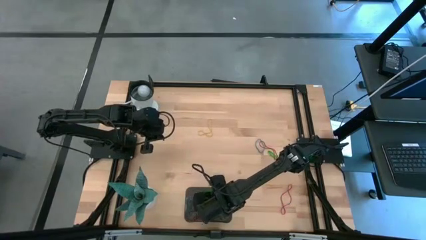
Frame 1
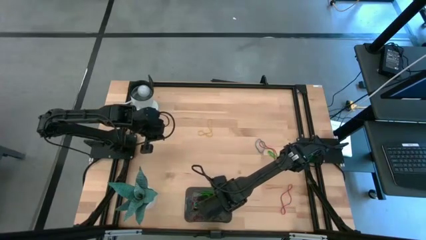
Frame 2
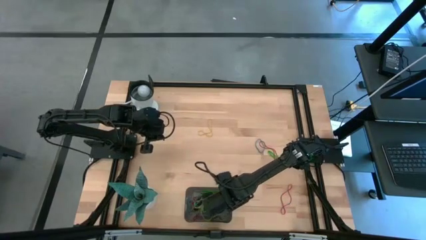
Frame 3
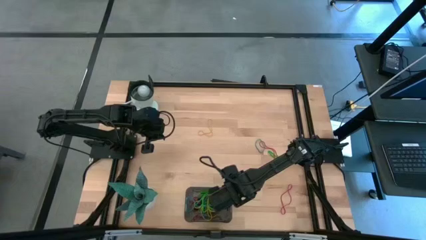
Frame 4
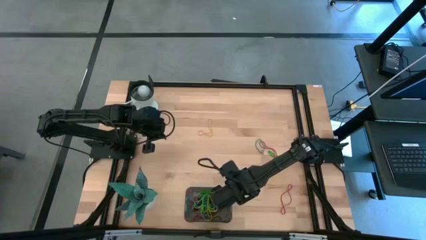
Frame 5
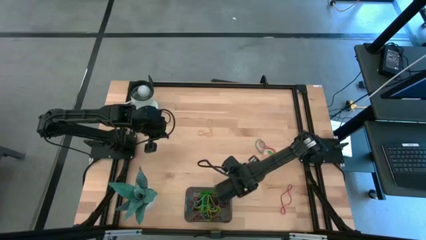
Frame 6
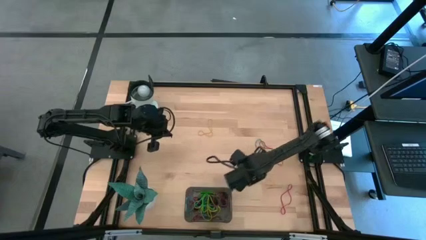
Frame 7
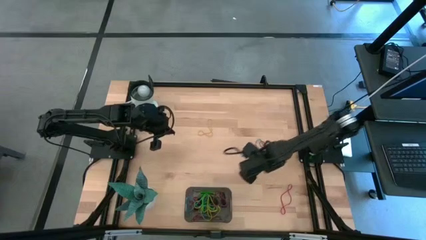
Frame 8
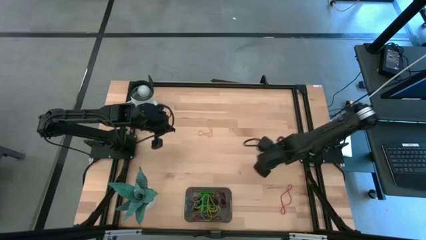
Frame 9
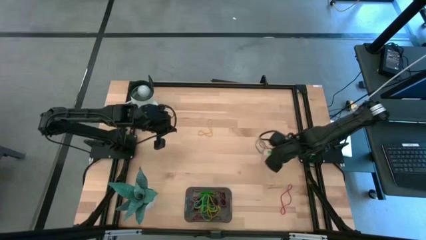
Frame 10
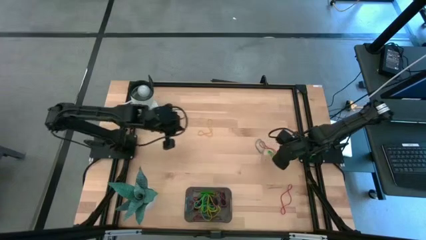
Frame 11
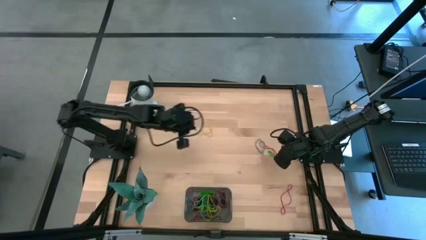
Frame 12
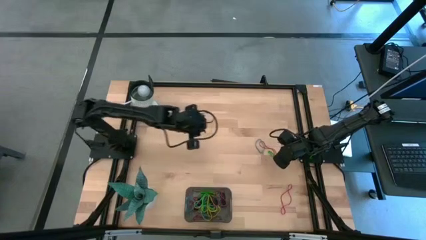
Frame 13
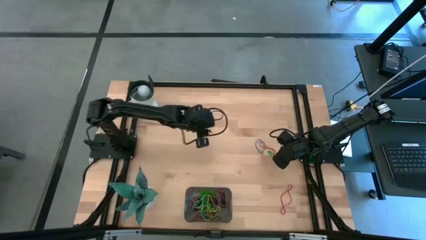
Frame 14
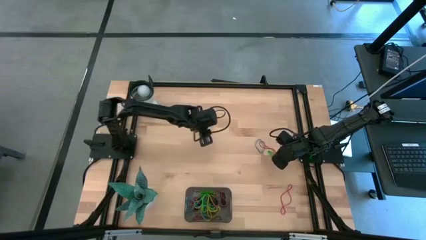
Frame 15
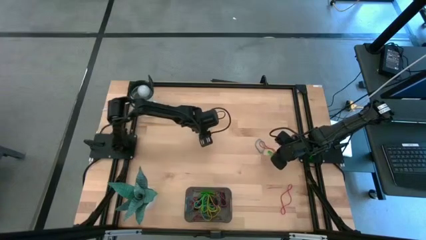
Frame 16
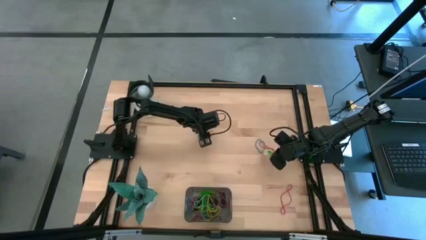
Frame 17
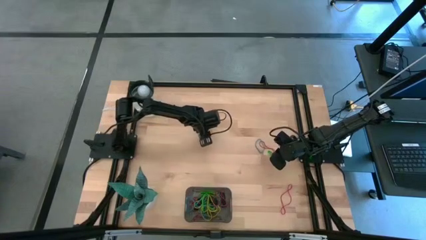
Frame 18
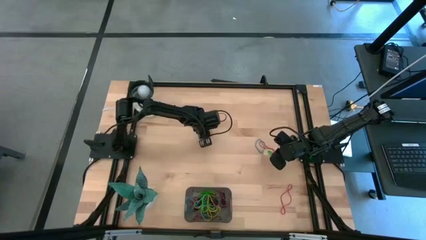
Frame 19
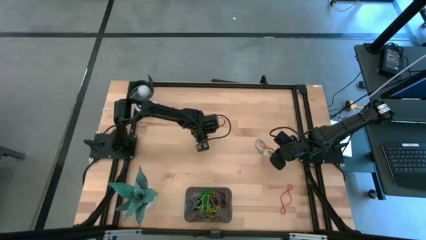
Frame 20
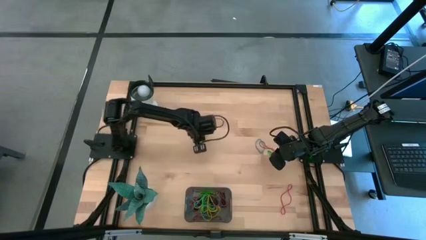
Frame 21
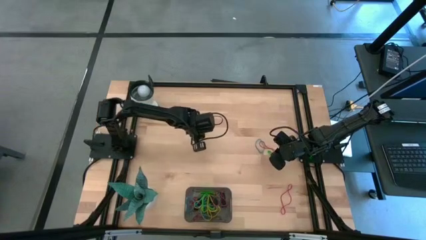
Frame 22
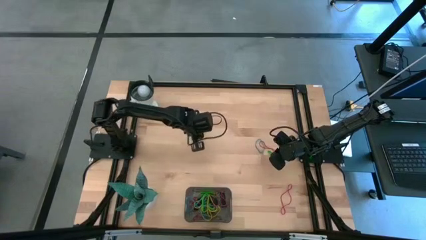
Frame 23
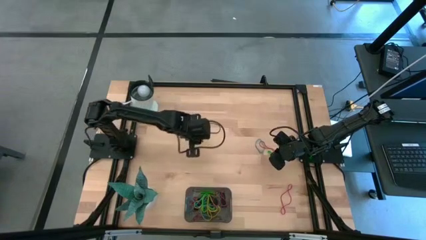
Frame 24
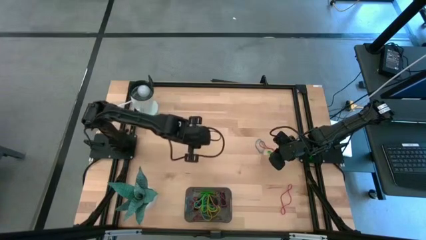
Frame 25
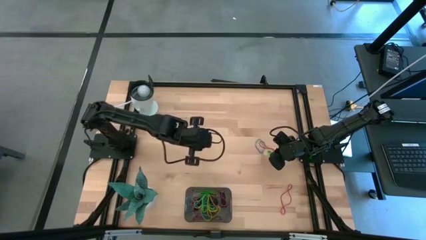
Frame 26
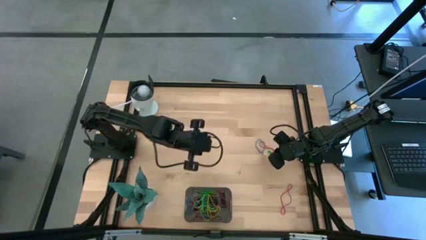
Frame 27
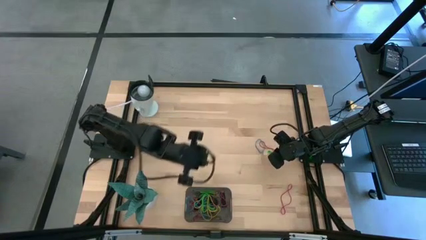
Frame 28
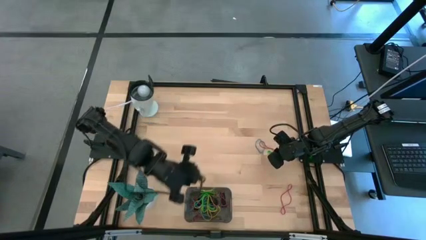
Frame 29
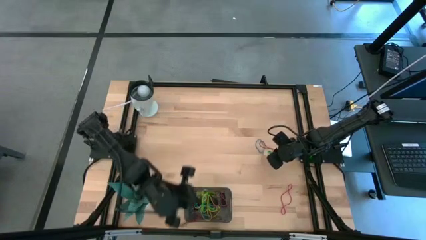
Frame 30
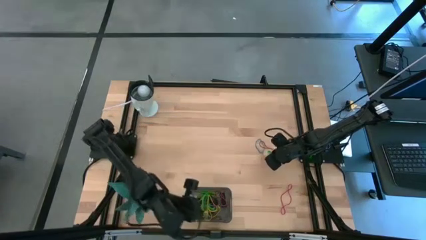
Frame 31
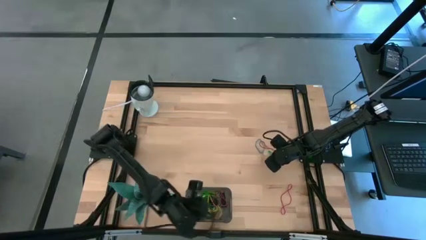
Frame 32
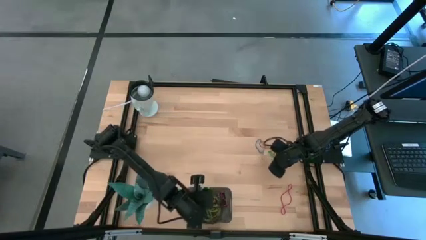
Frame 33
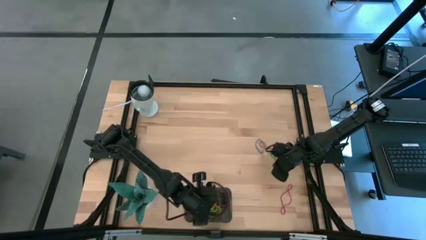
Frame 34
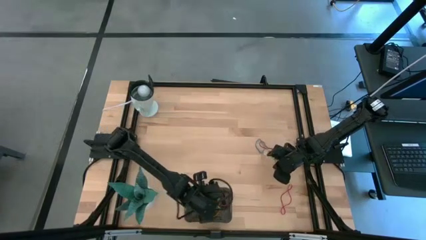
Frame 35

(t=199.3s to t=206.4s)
Task: Pick and place rubber bands into bin
Put the yellow rubber band into the black bin

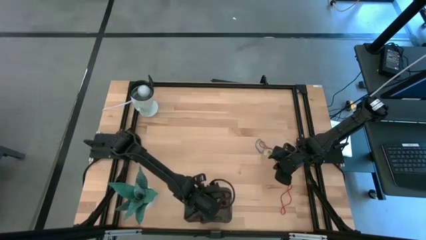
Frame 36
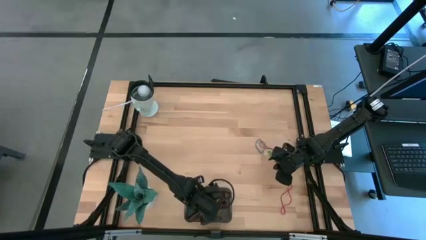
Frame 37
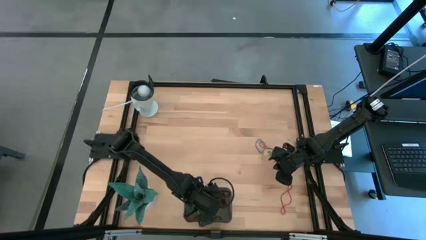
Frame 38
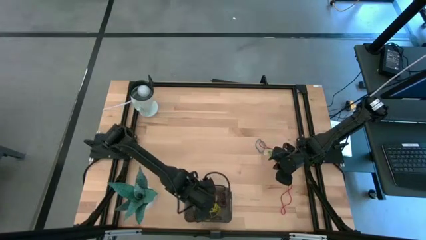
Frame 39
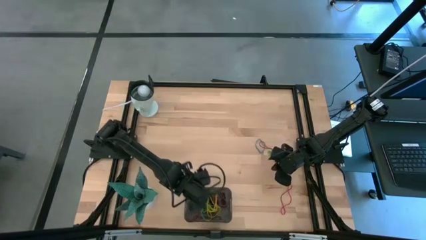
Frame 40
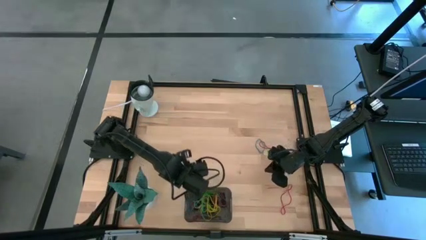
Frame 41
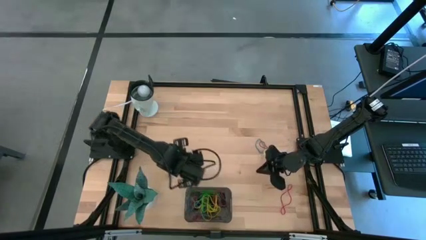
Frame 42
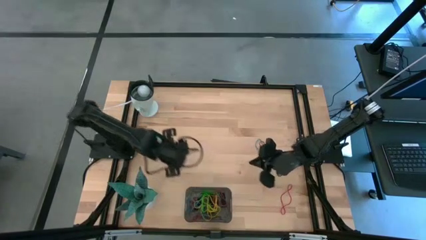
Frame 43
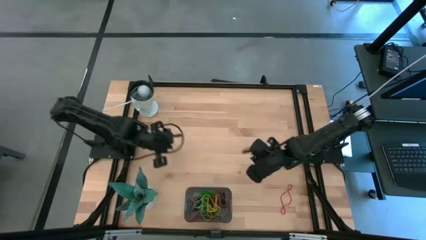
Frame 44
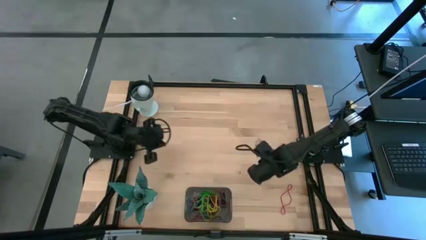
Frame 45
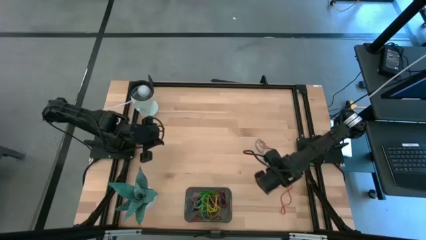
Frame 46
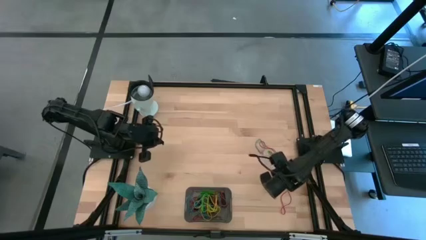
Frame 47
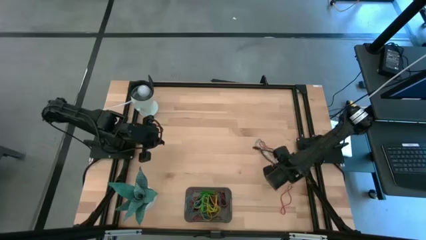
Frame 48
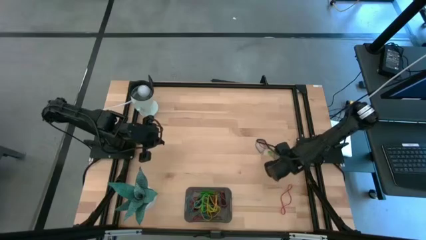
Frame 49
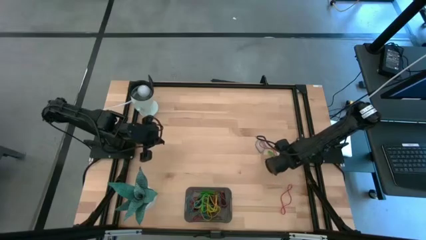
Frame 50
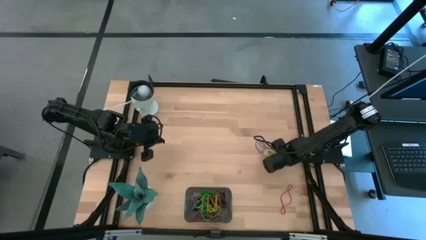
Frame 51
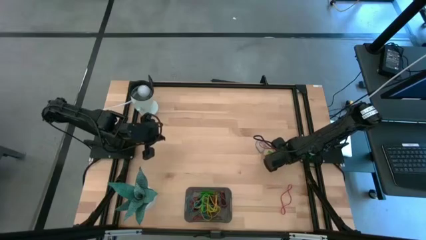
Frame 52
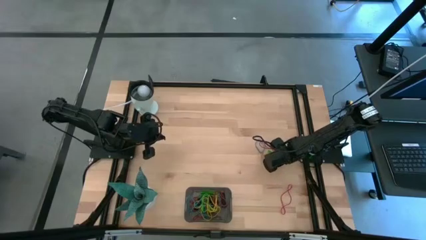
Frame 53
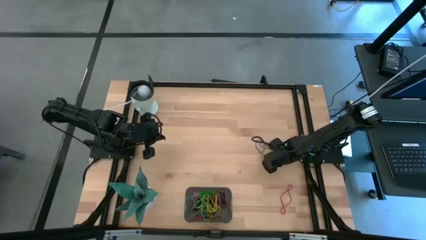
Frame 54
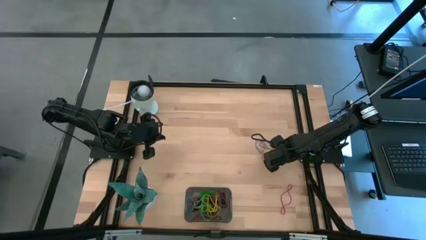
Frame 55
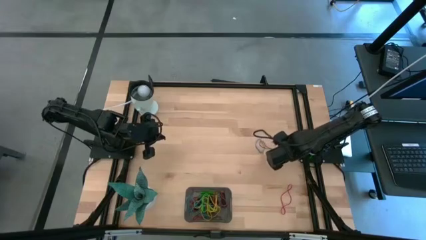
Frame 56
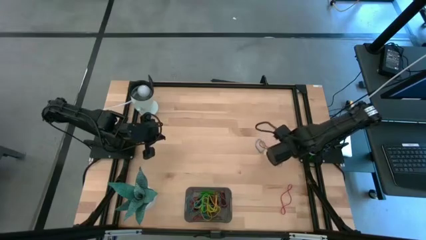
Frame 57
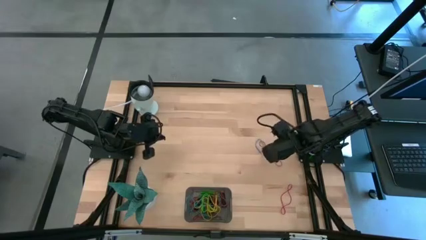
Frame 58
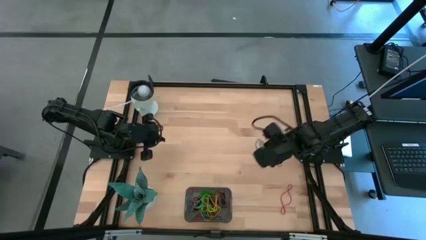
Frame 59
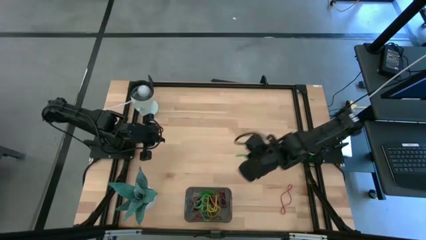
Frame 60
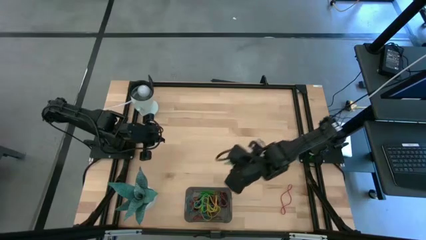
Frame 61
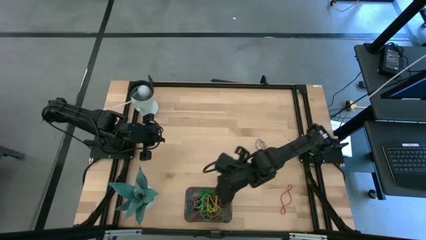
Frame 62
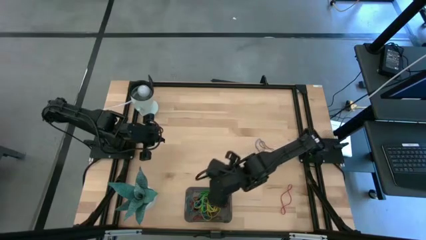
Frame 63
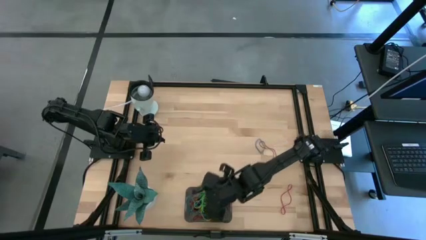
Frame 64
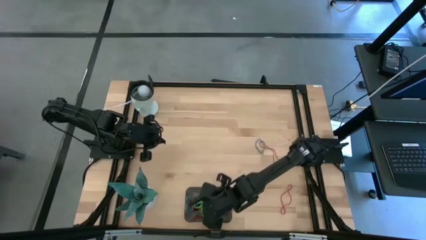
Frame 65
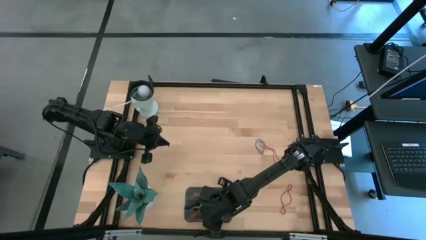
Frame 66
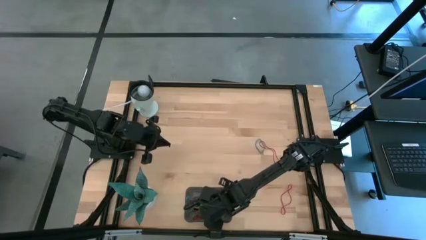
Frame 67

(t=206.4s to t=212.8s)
Put the green rubber band into the black bin

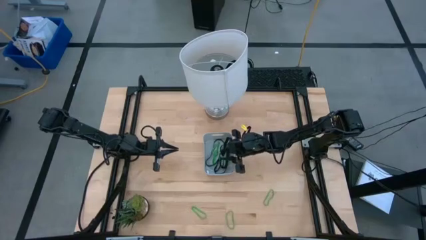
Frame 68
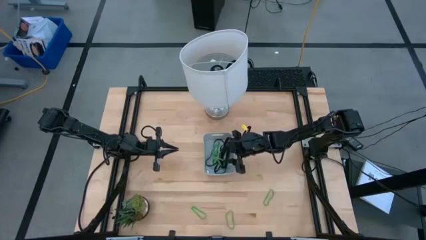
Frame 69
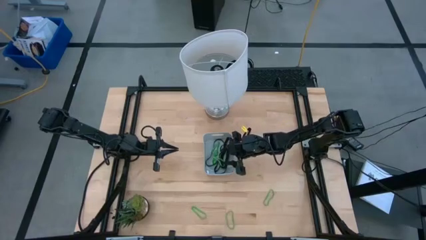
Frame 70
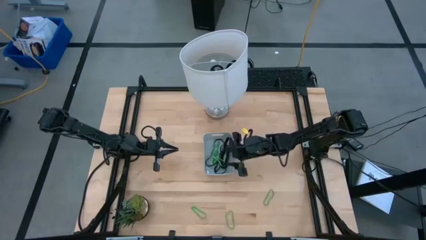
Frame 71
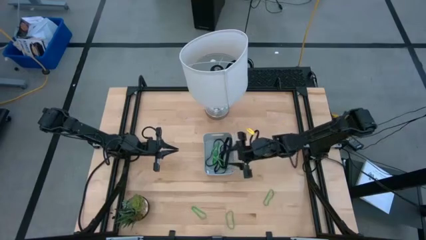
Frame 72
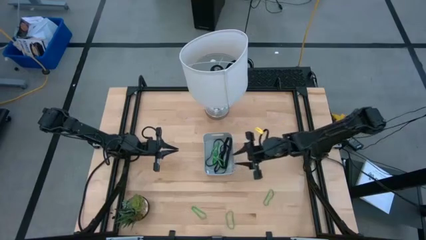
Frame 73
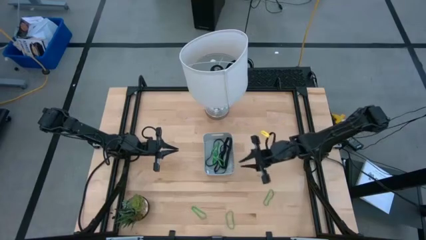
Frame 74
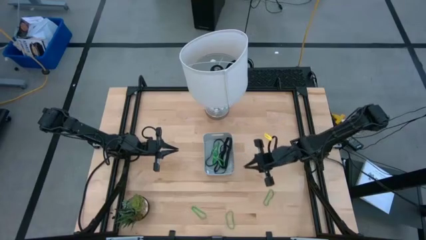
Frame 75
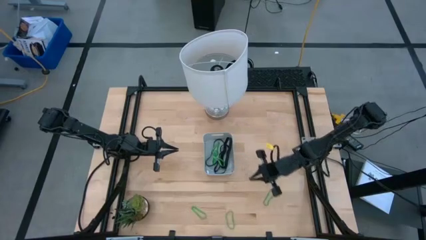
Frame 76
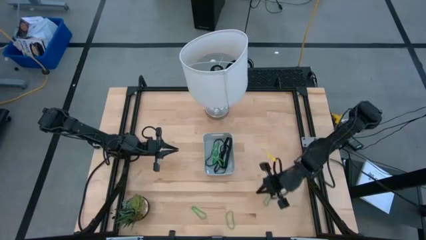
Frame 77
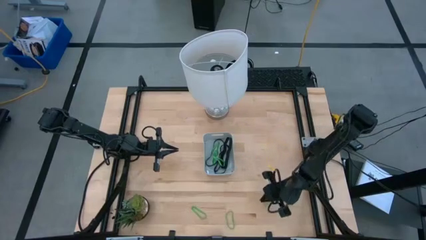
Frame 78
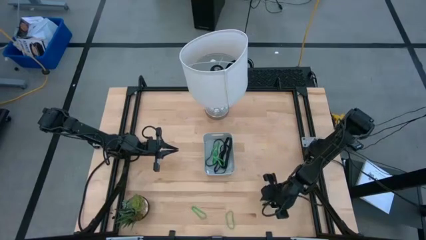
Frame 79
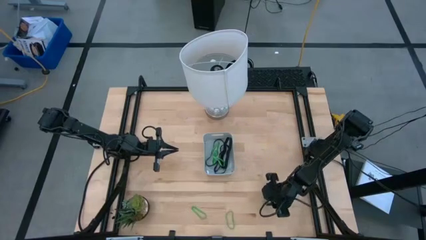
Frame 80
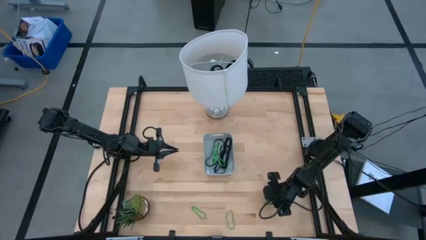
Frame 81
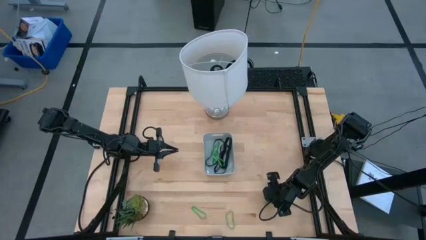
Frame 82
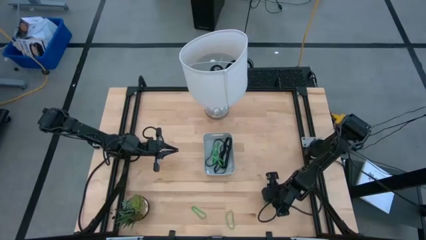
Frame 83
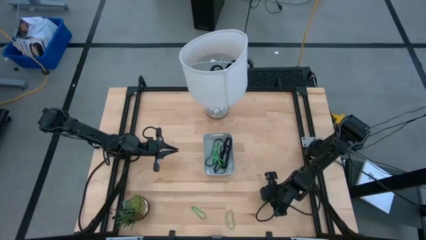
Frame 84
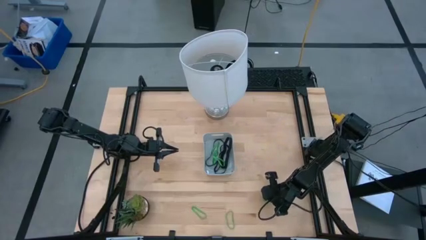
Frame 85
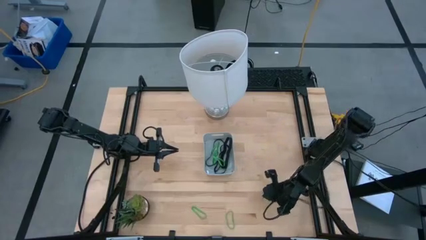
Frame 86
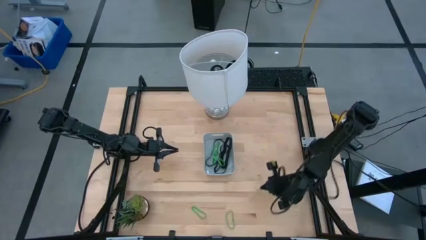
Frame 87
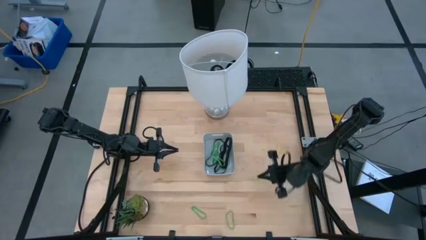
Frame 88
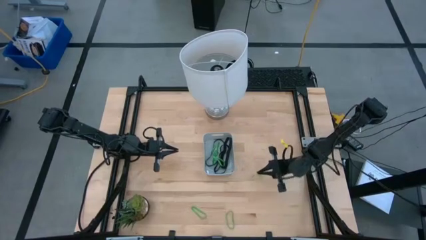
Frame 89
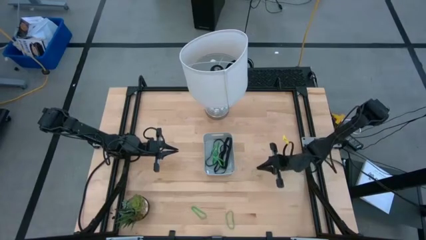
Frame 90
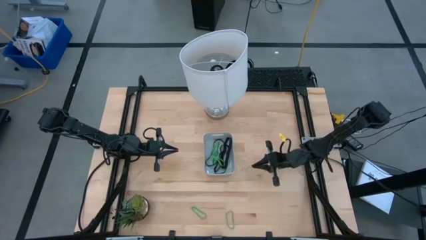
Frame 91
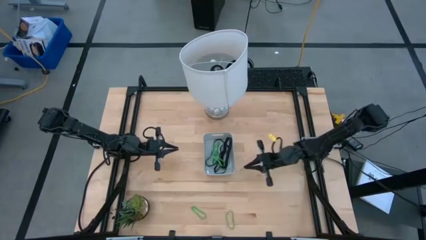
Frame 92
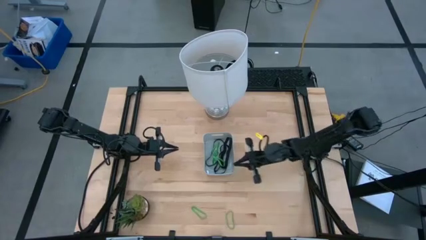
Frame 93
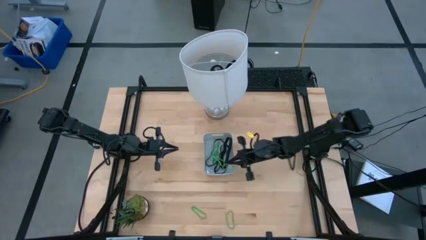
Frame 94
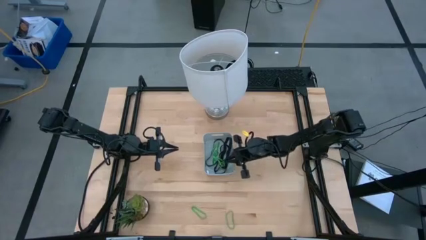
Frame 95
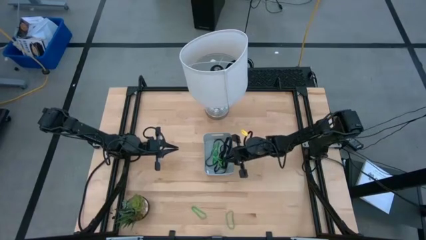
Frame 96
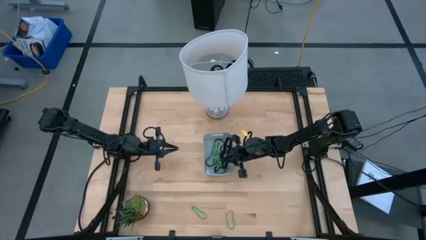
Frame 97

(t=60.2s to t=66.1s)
Task: Pick and place rubber bands into bin
Put the green rubber band into the gray bin
